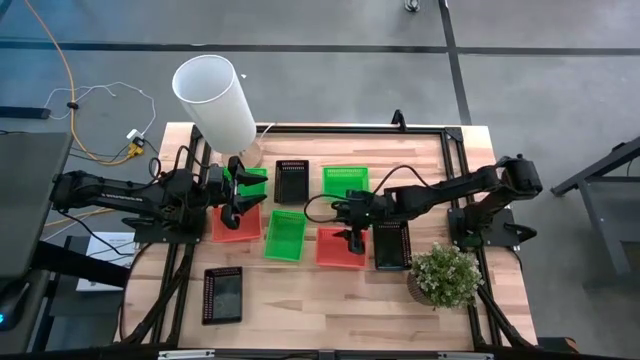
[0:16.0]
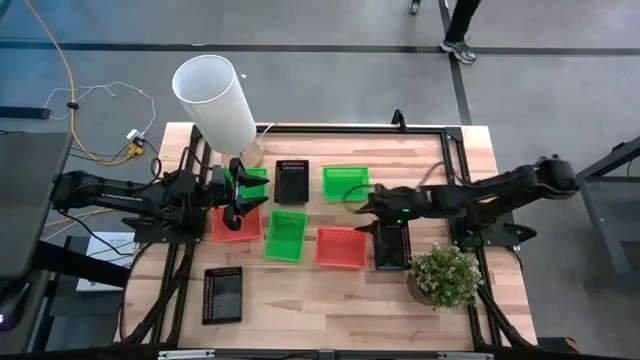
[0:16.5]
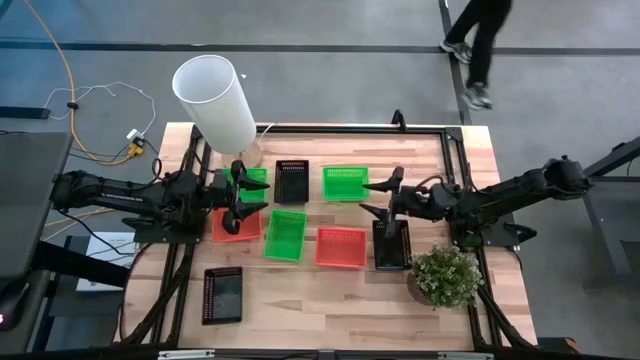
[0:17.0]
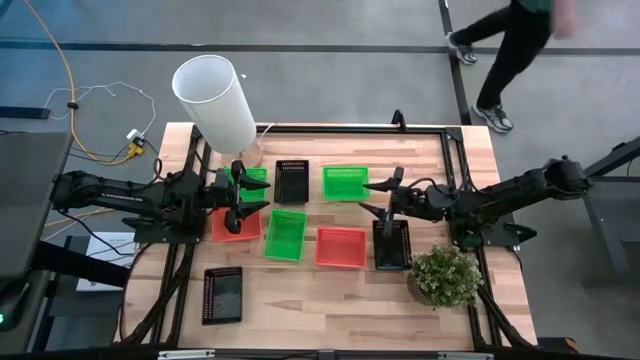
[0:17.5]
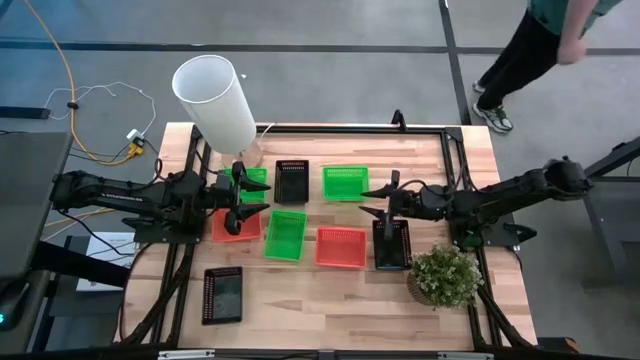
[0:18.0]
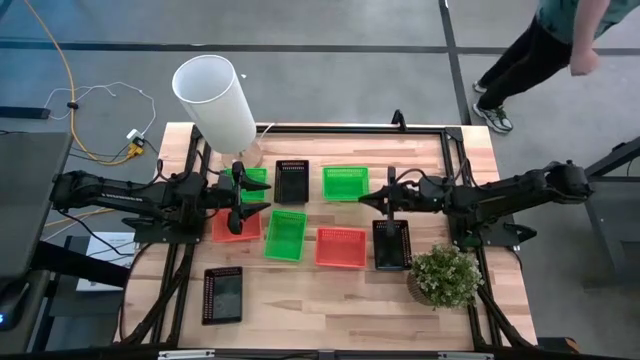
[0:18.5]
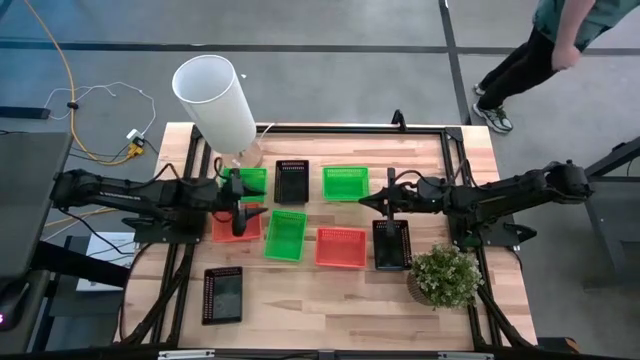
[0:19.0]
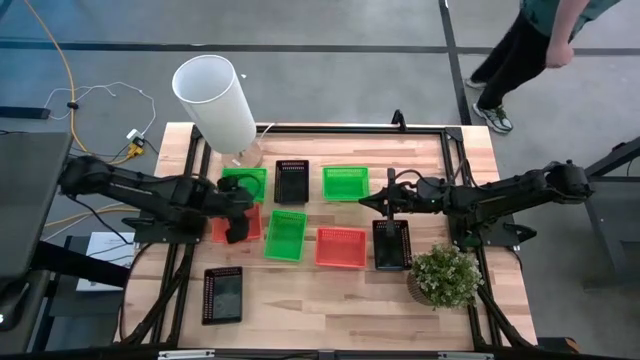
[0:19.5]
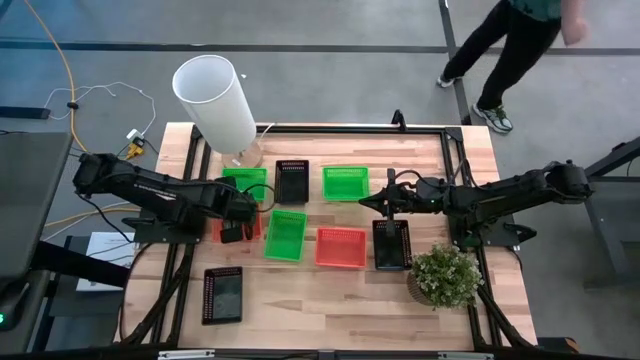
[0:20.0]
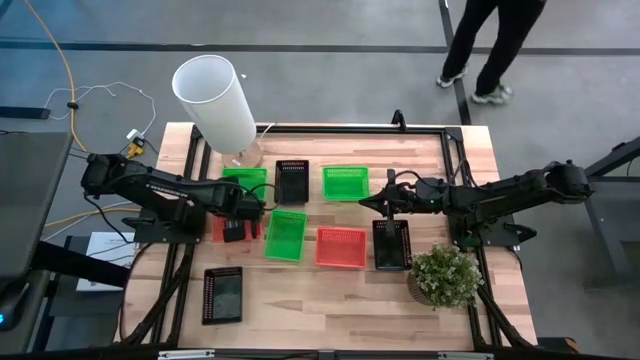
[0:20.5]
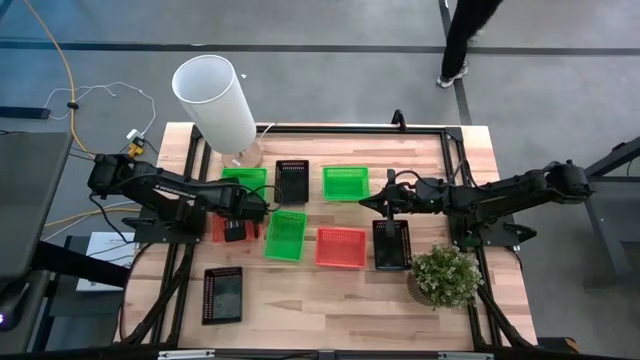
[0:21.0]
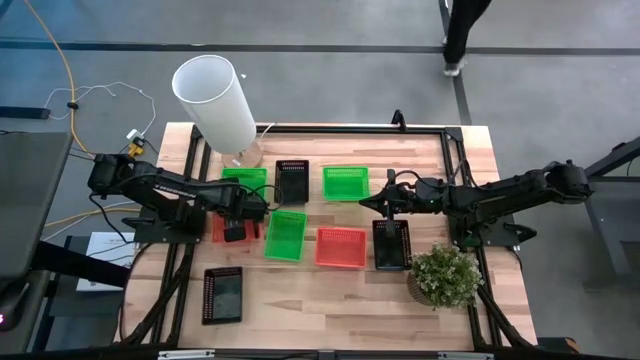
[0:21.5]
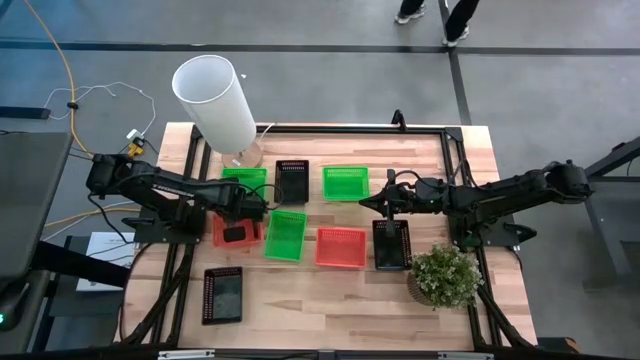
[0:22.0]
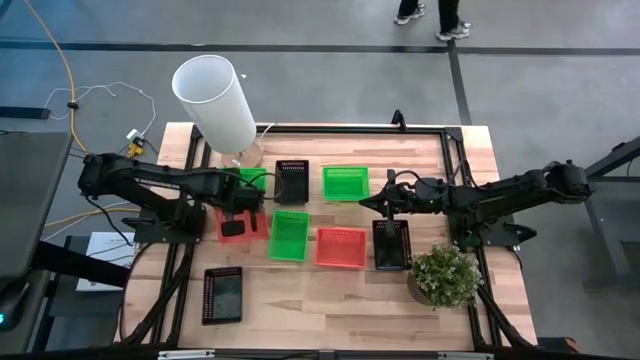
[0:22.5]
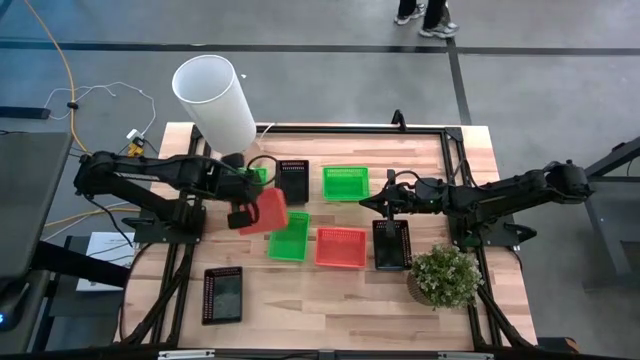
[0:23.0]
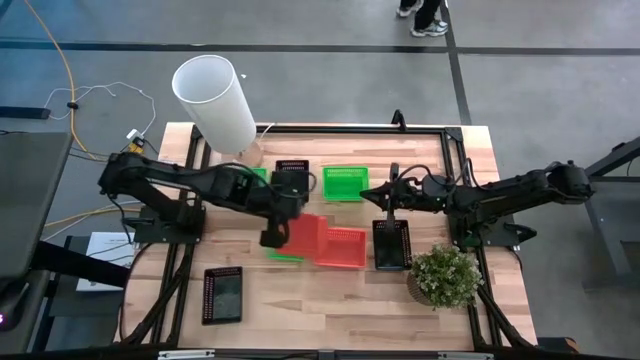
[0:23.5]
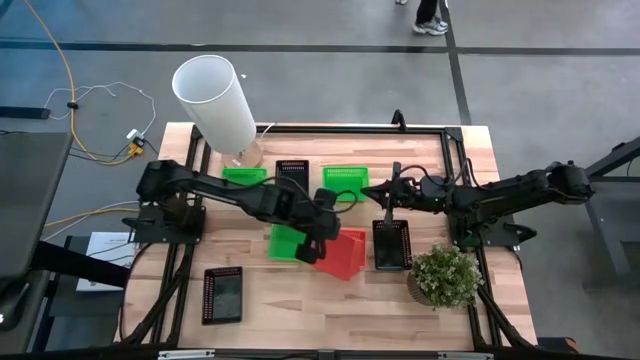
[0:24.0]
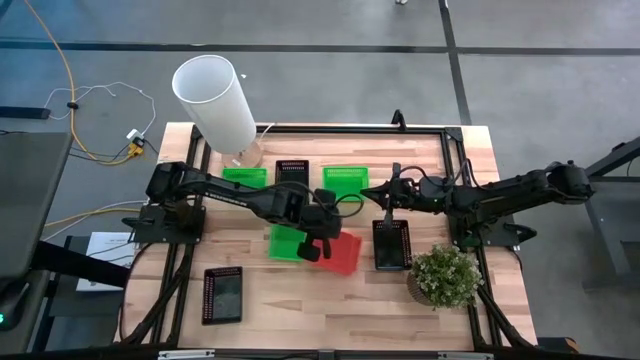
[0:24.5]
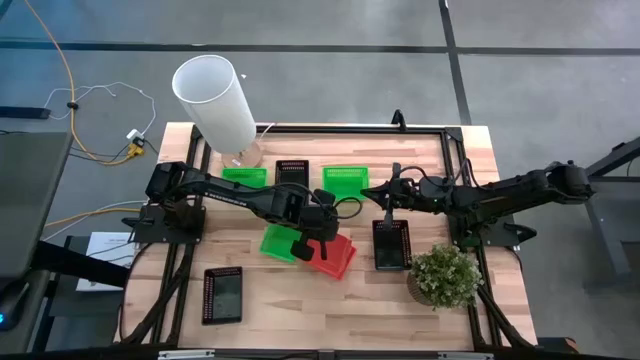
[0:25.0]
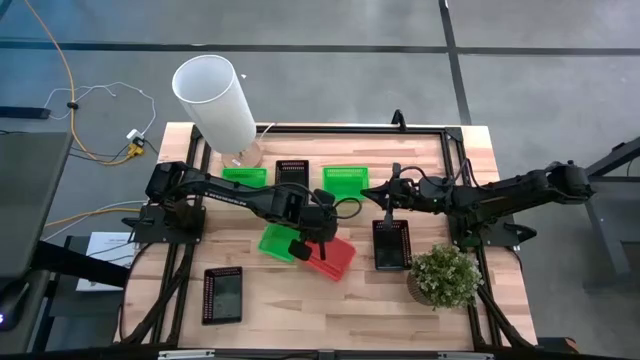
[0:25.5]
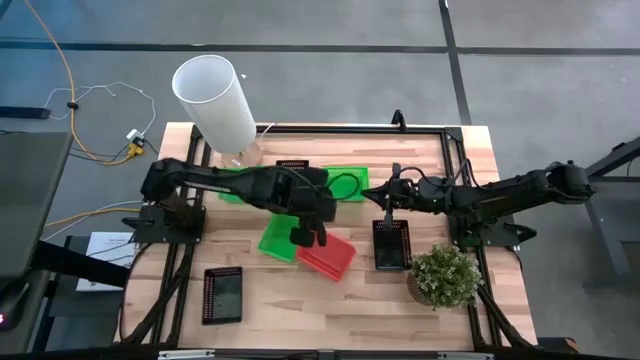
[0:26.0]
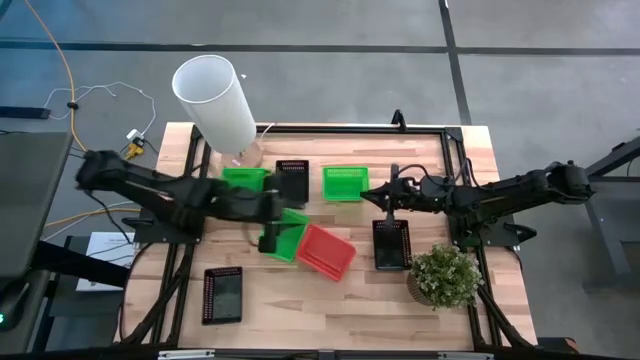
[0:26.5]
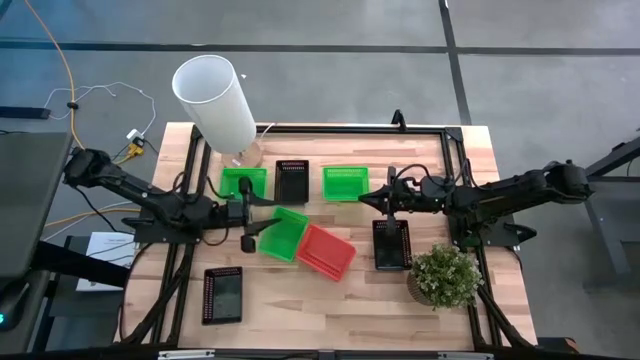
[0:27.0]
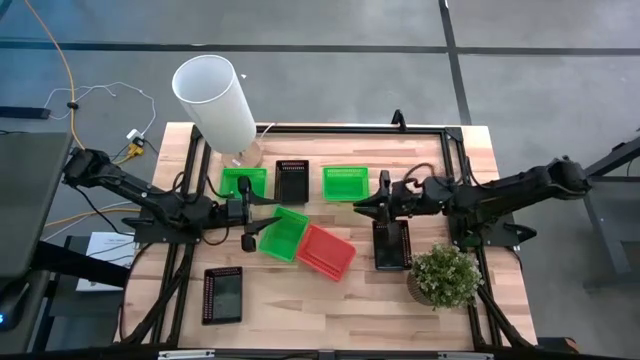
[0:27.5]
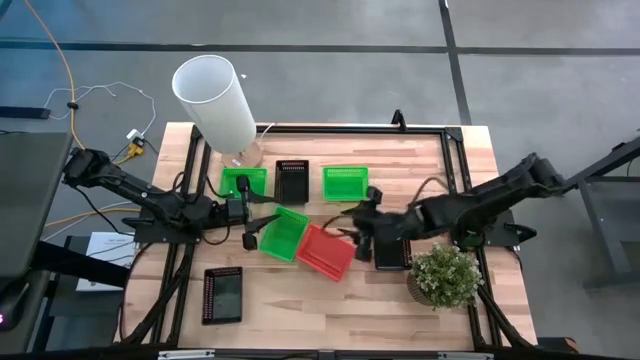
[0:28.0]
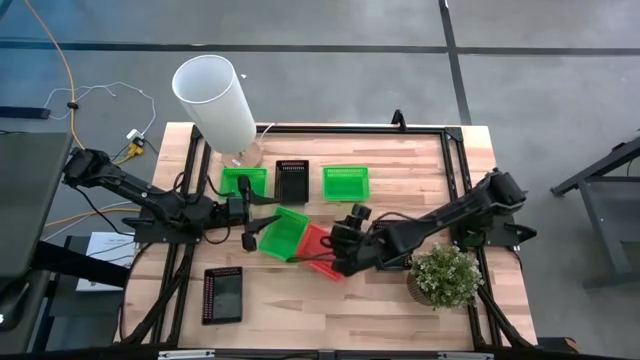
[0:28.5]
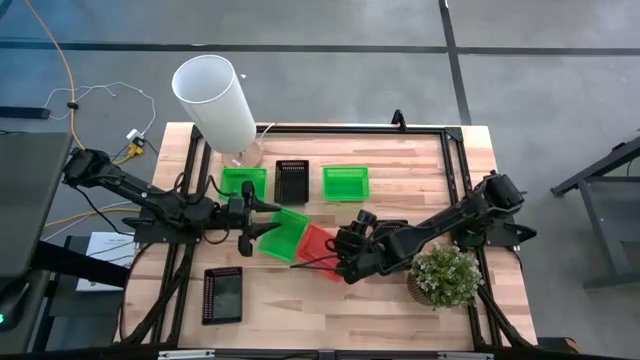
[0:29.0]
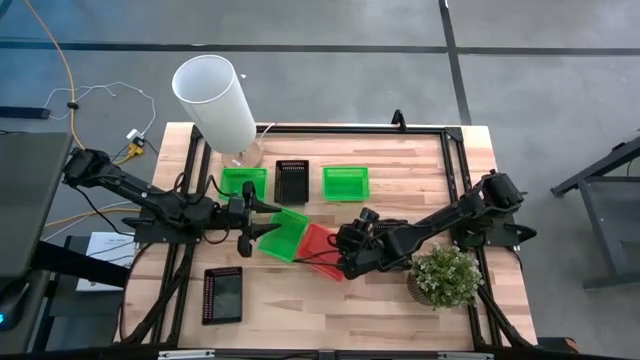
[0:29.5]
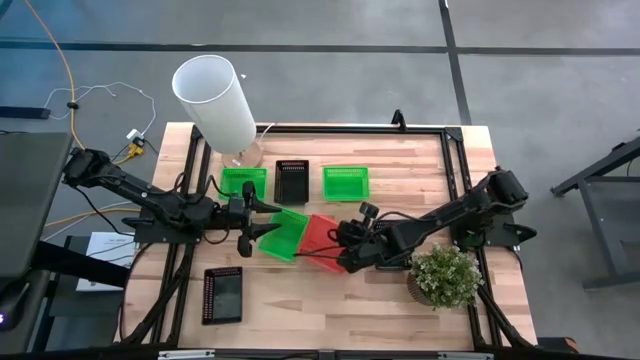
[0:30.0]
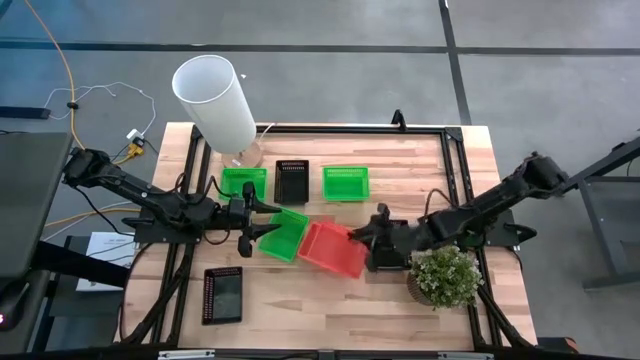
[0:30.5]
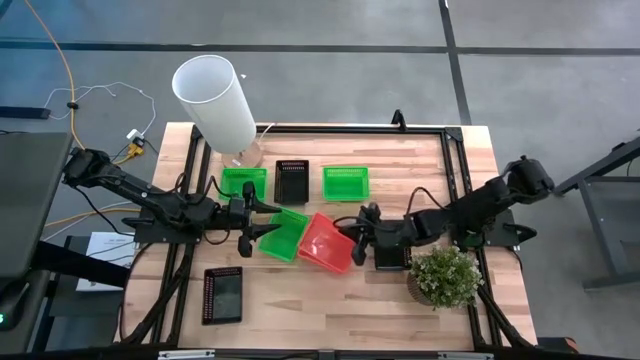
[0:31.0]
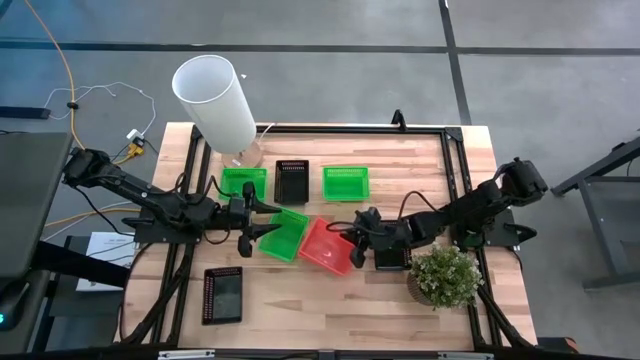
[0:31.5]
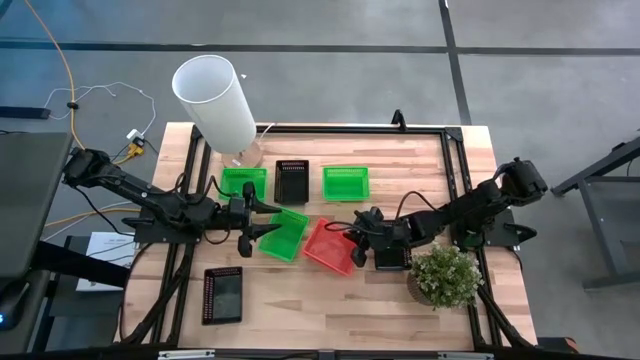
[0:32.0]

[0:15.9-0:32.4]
Stack the orange bin on the orange bin
